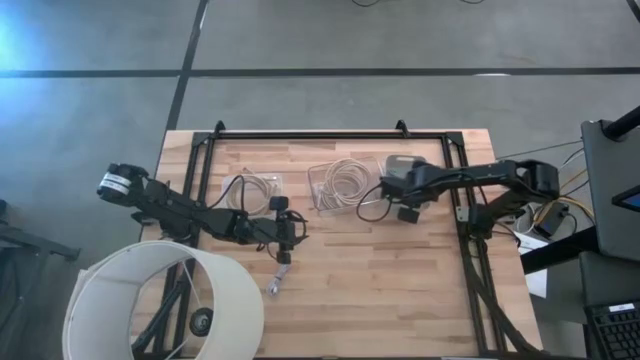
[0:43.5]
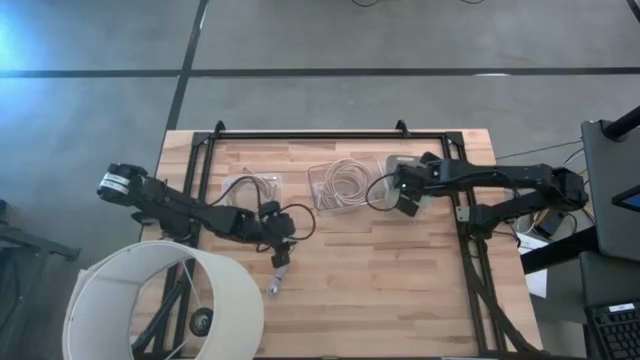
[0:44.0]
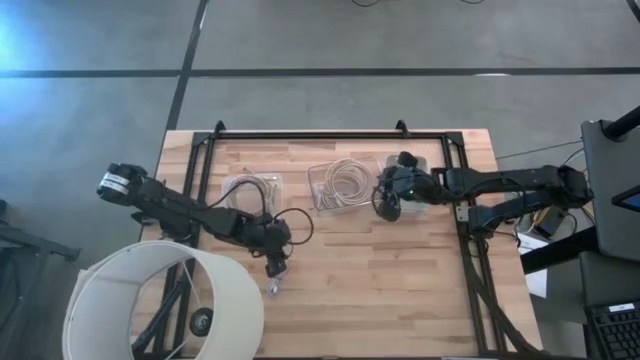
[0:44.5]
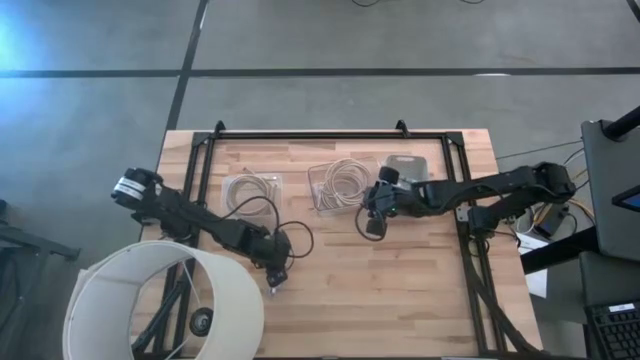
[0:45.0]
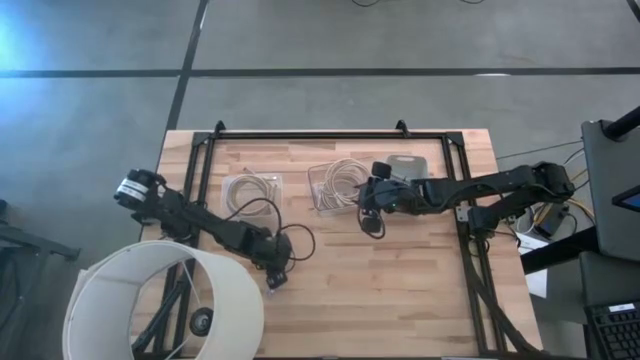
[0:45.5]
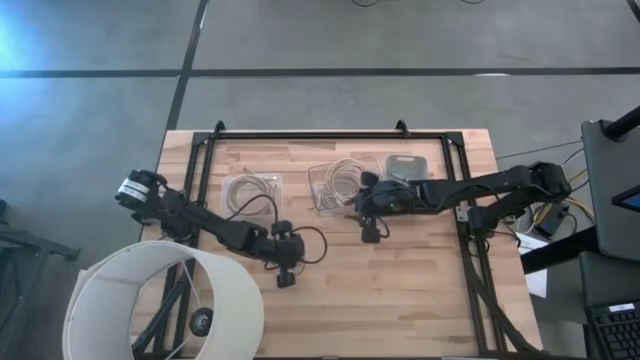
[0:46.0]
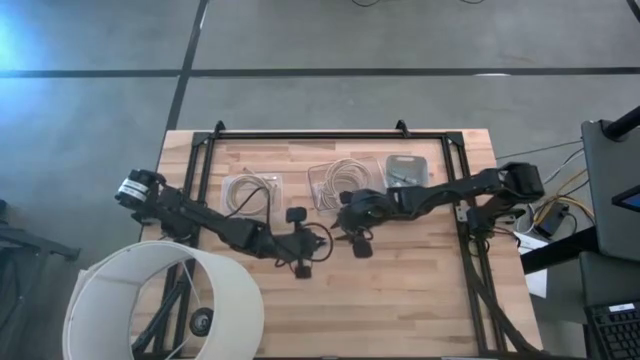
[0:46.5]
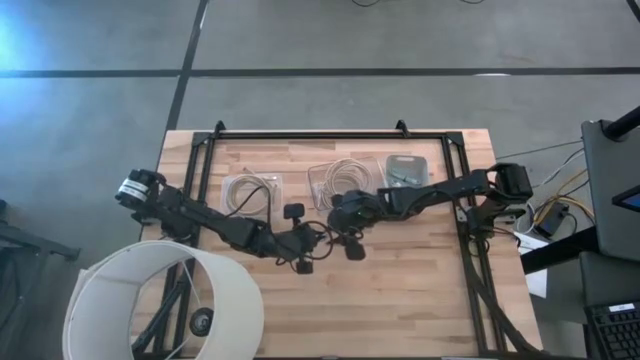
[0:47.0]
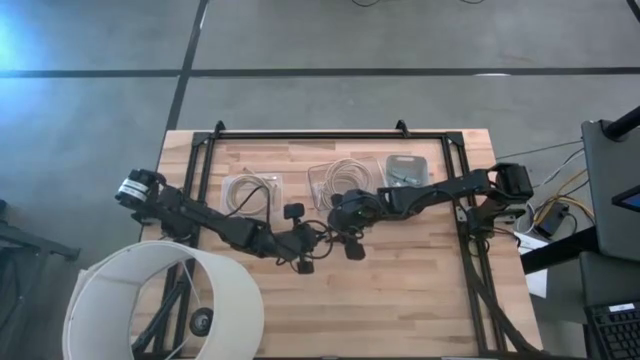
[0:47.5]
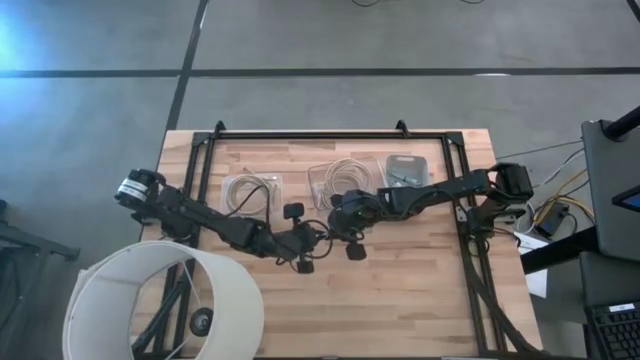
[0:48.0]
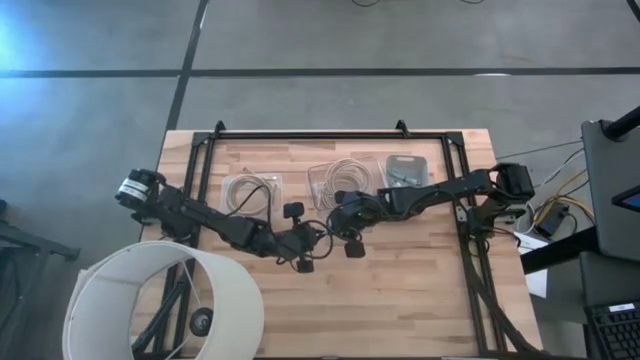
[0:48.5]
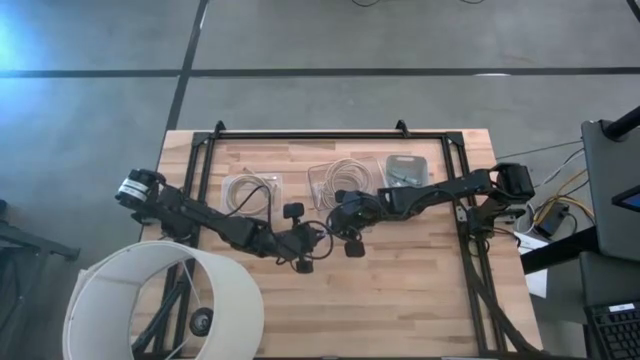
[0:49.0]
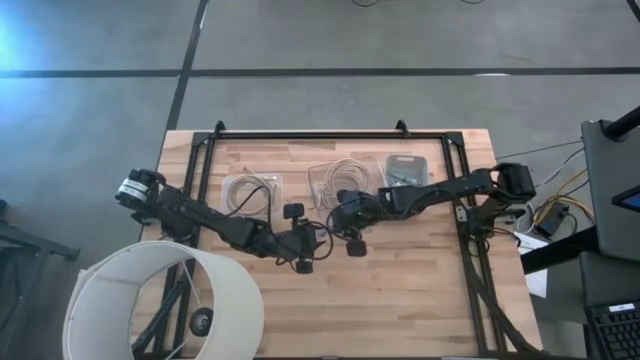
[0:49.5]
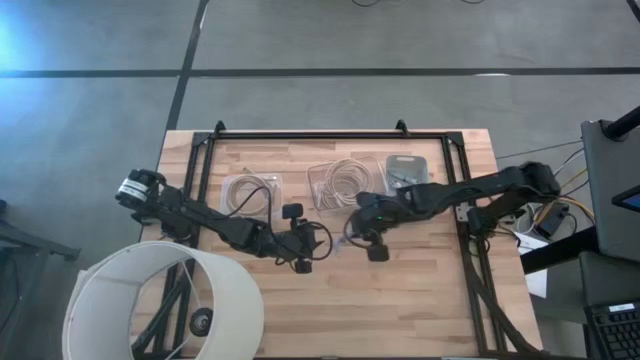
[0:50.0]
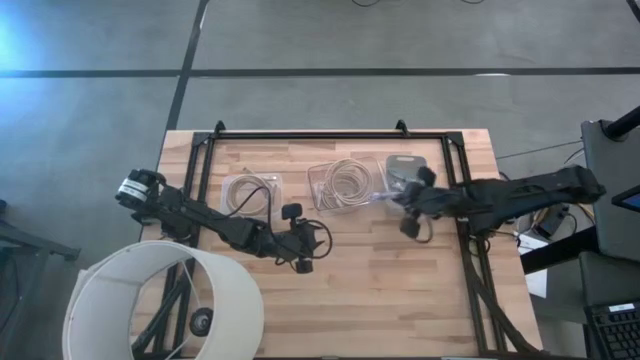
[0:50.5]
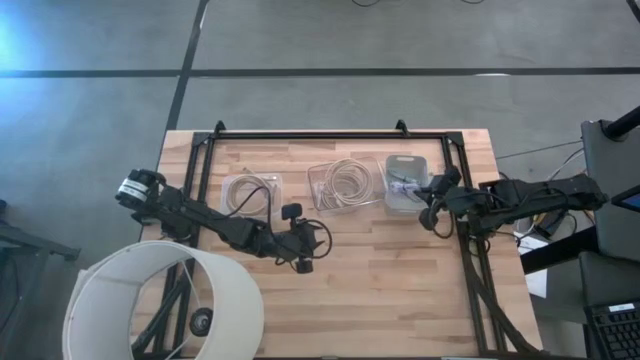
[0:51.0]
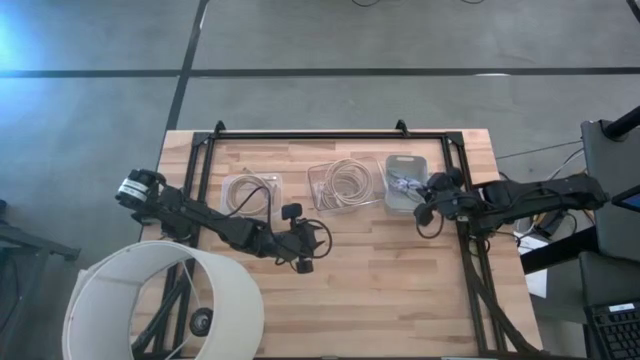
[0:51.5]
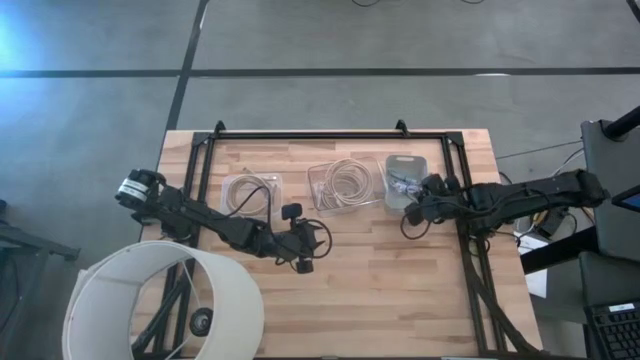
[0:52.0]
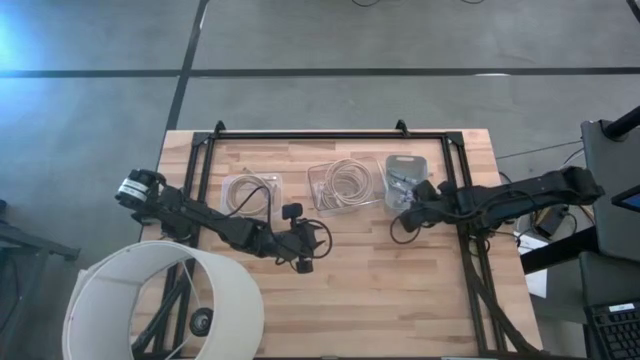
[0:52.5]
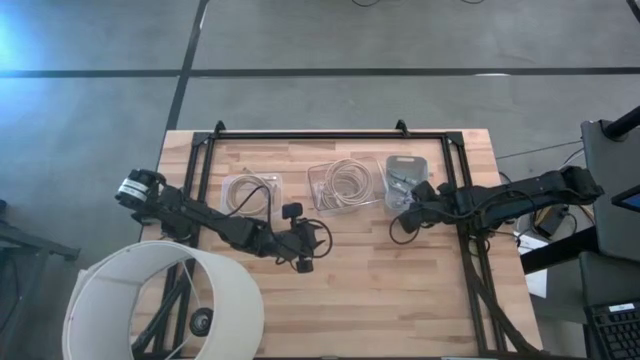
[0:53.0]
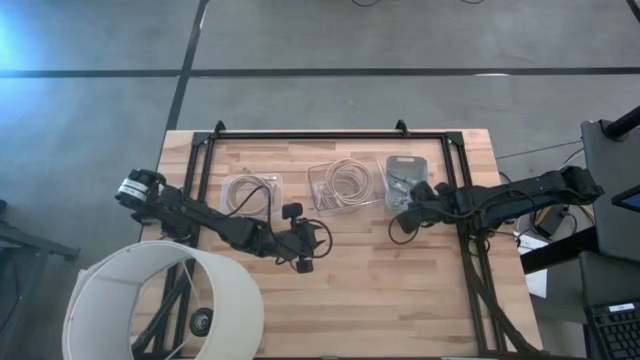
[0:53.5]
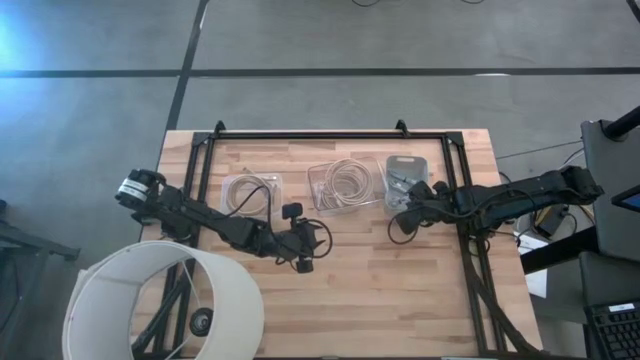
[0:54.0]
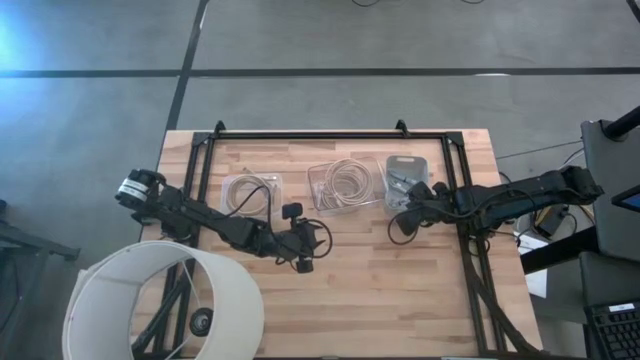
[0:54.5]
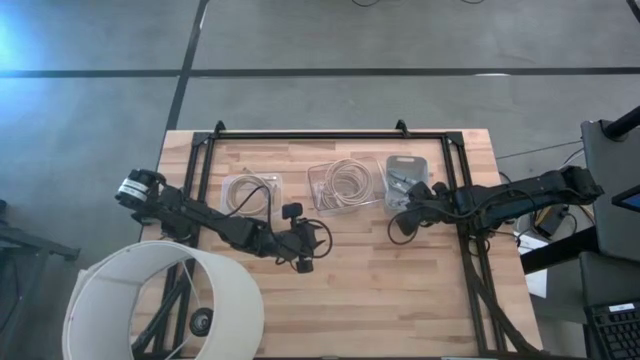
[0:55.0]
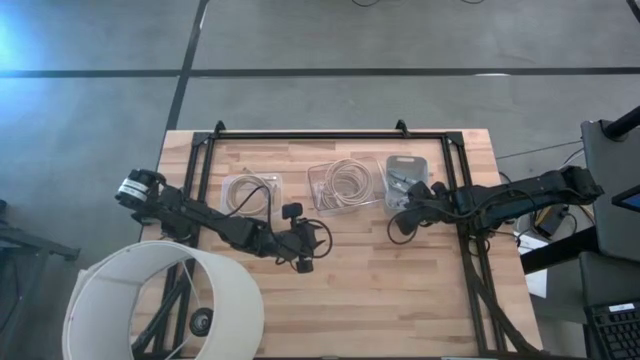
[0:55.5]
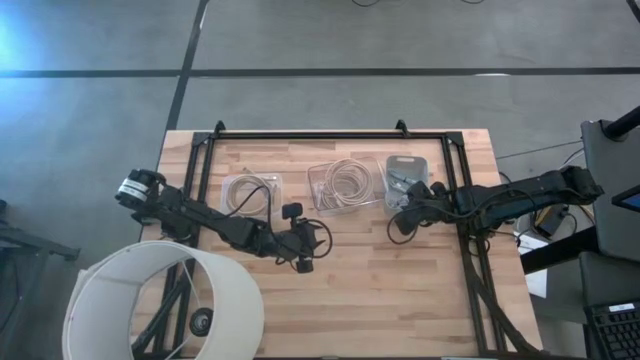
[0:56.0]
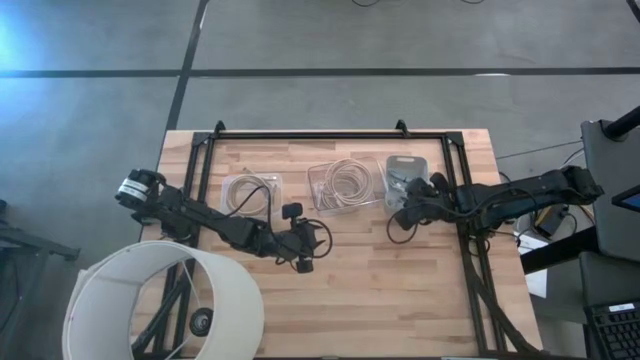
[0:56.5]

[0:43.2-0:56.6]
Task: Pick & Place USB Port
Put the white charger cable into the white bin

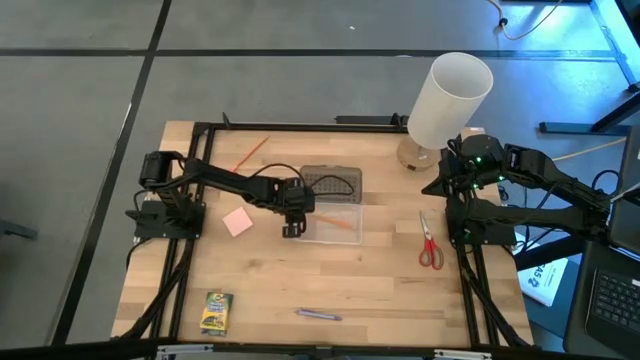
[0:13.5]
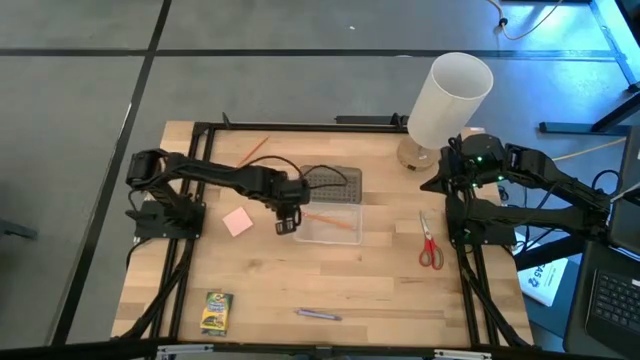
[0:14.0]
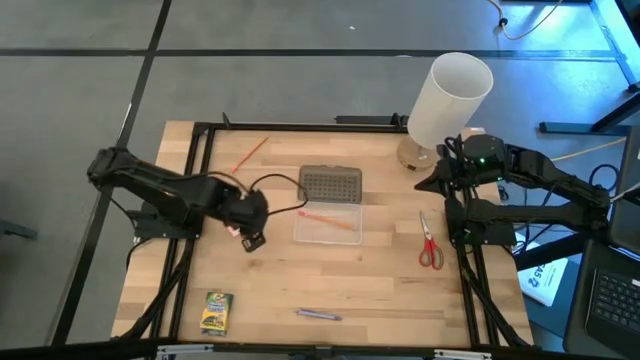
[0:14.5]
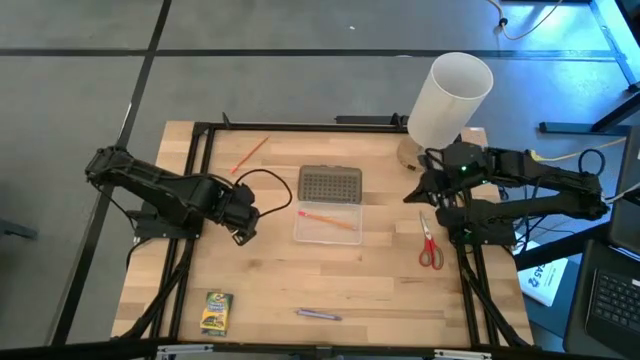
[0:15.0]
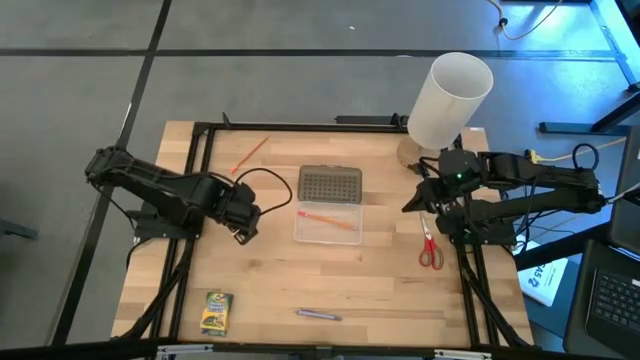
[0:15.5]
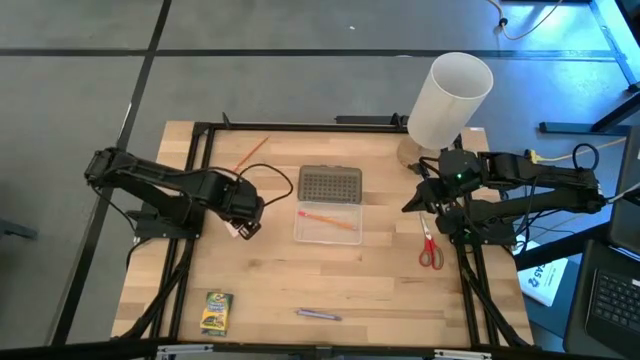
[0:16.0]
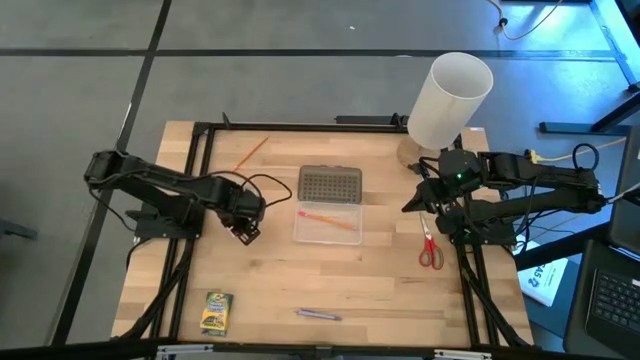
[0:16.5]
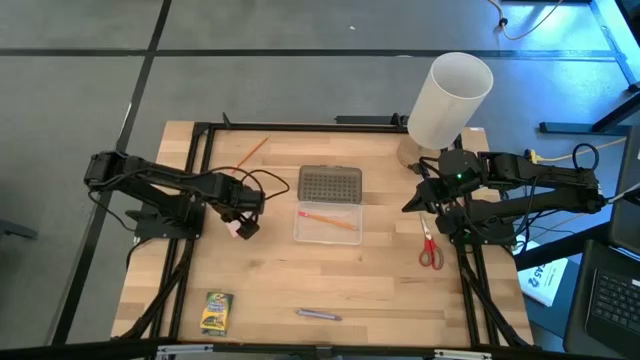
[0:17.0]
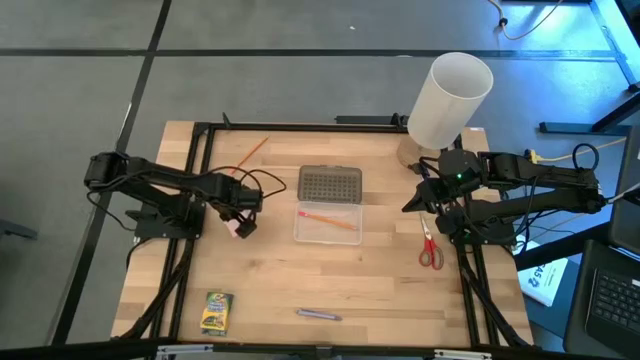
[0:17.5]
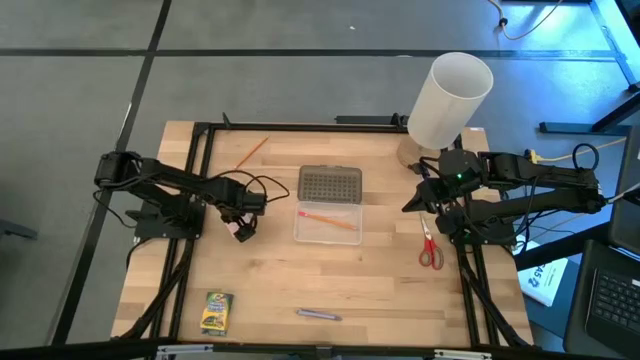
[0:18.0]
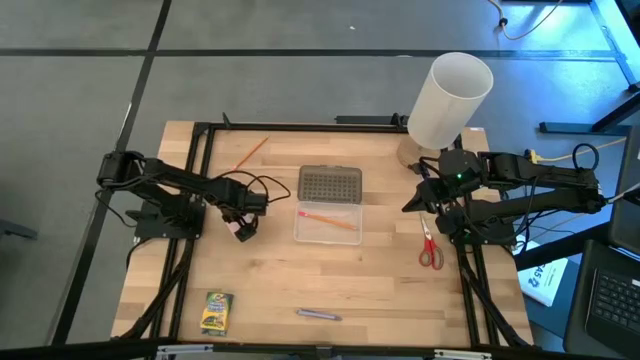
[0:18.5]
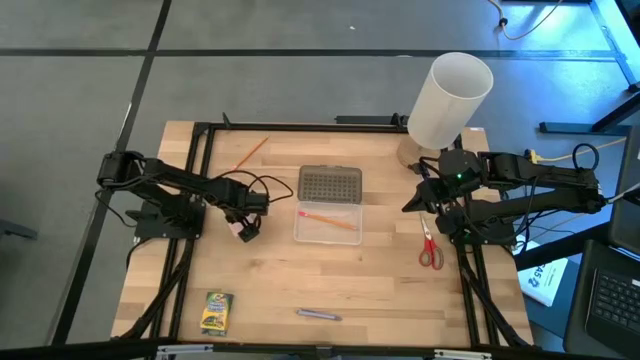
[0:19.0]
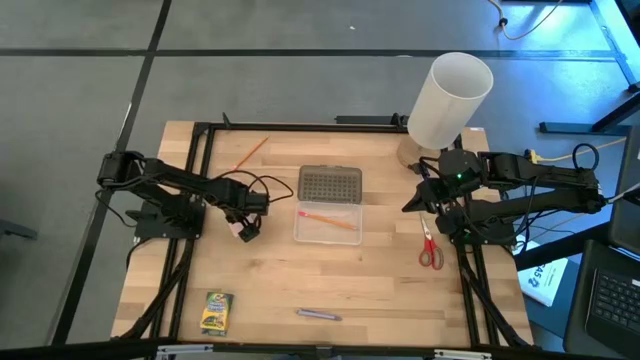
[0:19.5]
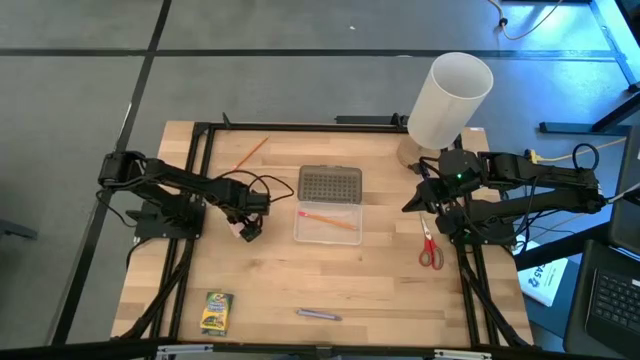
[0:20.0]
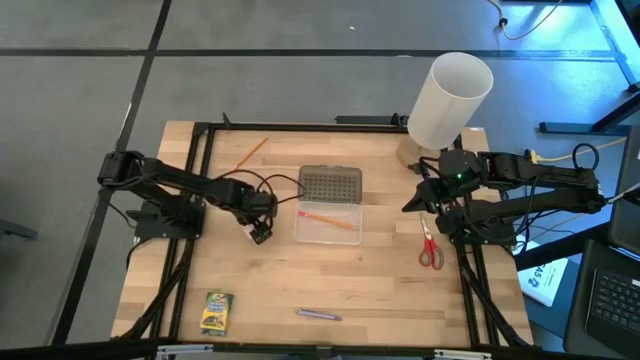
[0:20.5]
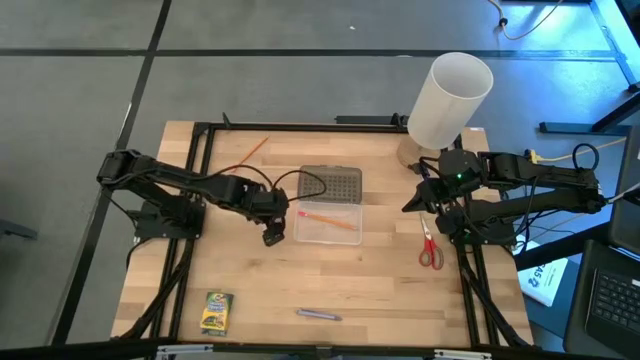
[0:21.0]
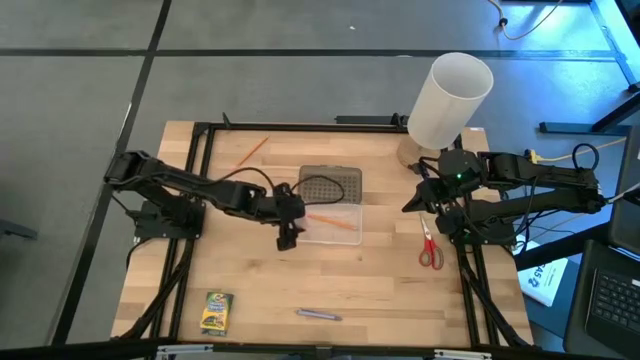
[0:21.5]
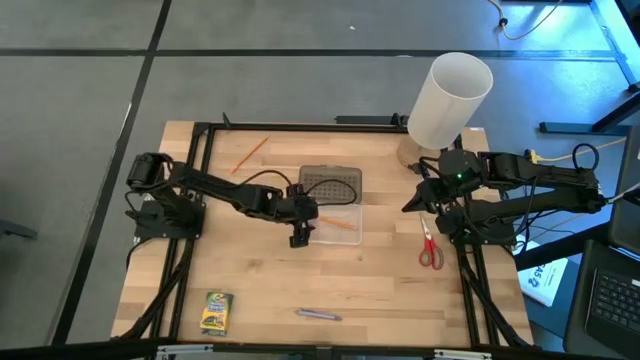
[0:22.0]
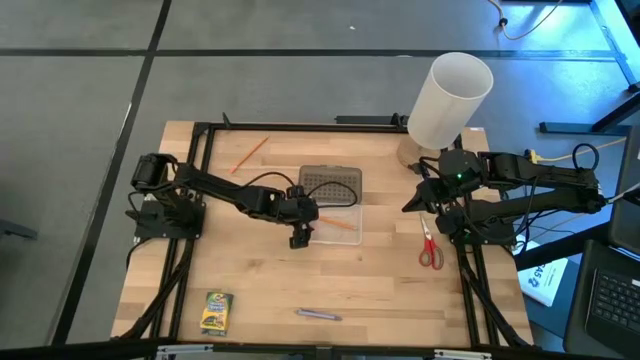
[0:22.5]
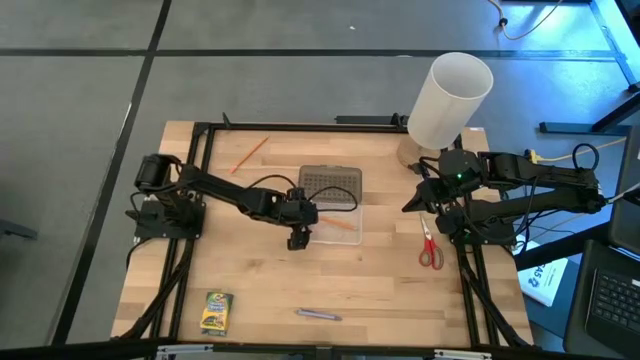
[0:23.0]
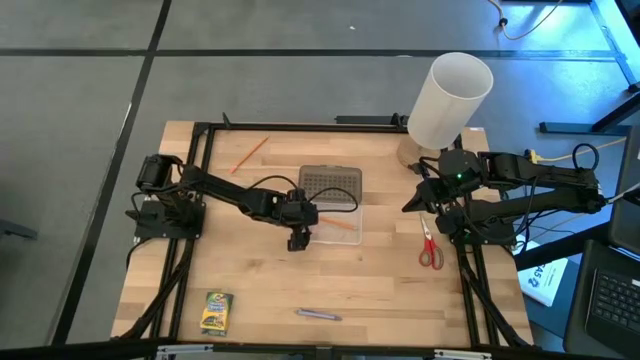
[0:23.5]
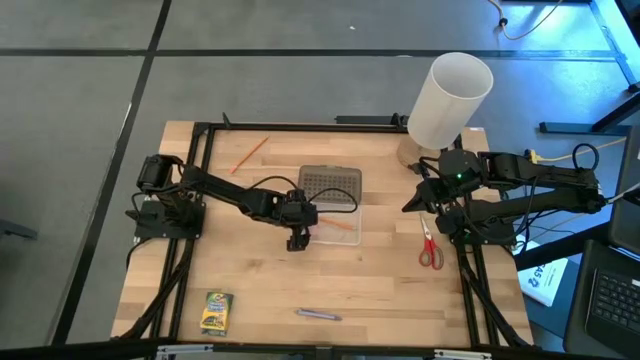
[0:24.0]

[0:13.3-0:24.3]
Task: Pack school essentials
Put the pink sticky notes into the supply box
